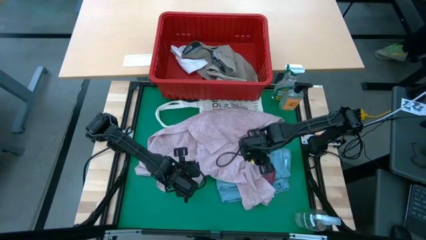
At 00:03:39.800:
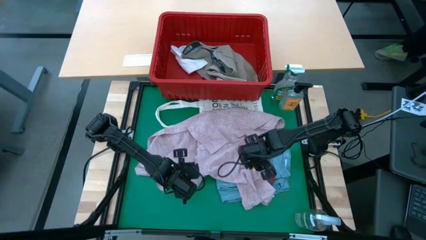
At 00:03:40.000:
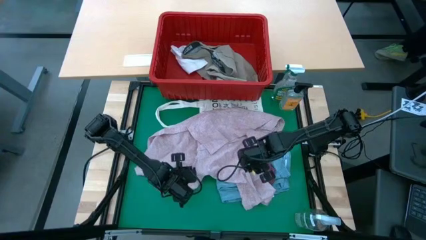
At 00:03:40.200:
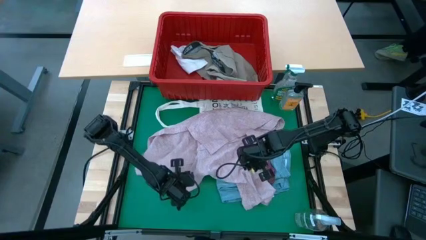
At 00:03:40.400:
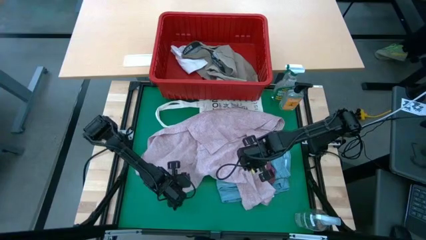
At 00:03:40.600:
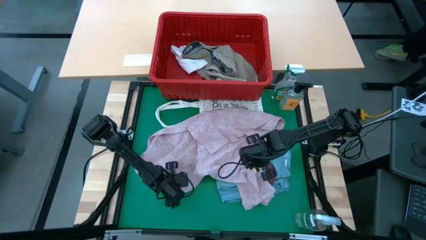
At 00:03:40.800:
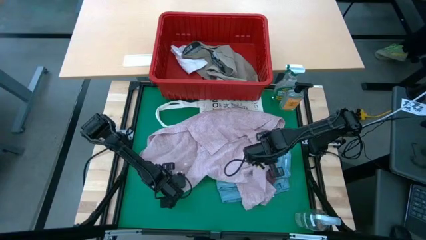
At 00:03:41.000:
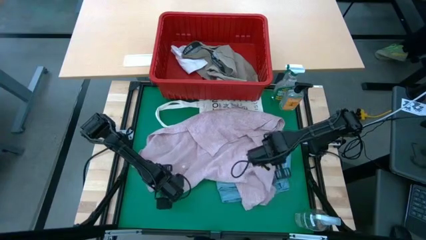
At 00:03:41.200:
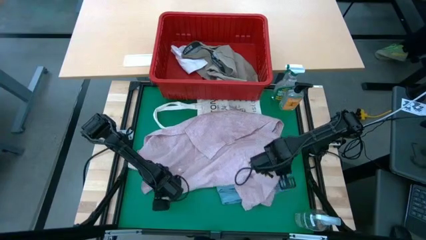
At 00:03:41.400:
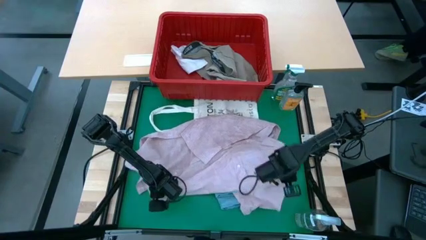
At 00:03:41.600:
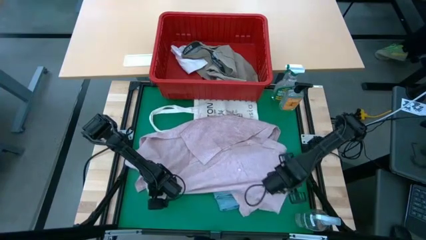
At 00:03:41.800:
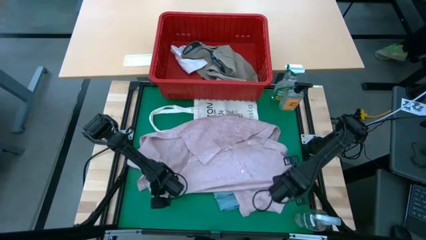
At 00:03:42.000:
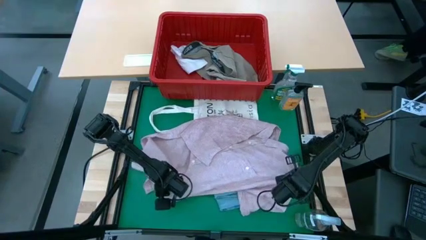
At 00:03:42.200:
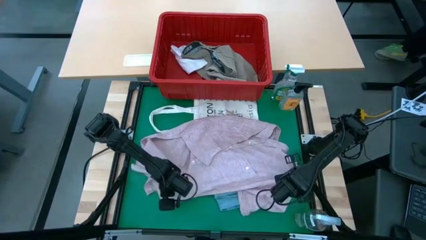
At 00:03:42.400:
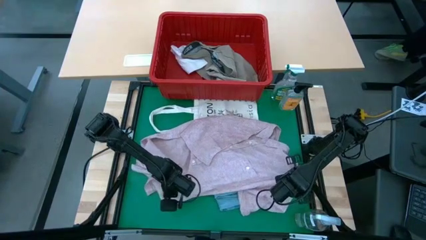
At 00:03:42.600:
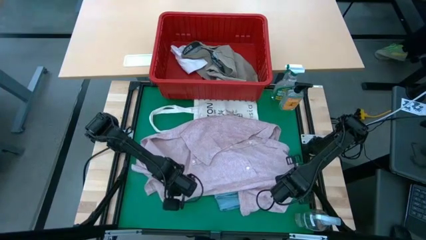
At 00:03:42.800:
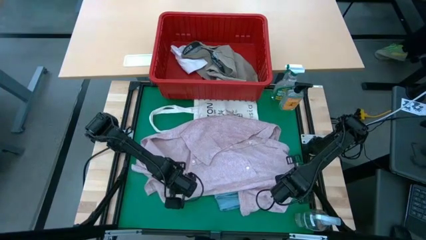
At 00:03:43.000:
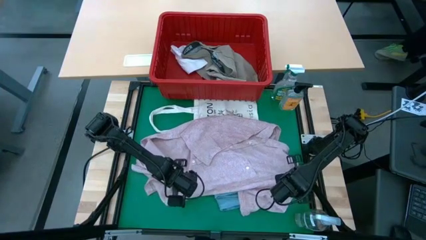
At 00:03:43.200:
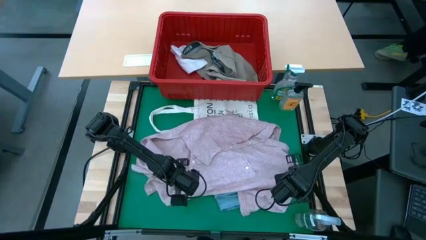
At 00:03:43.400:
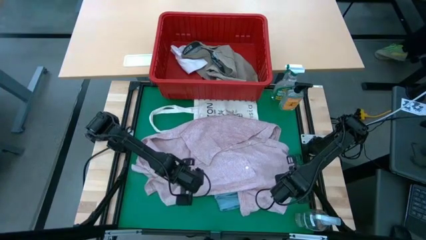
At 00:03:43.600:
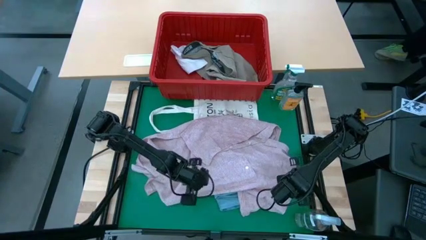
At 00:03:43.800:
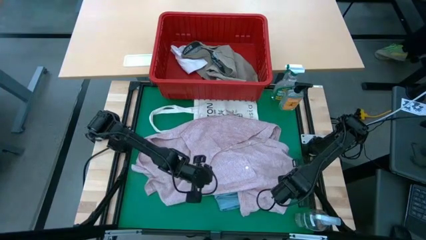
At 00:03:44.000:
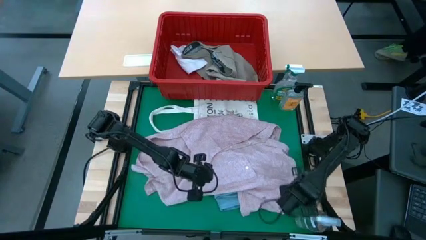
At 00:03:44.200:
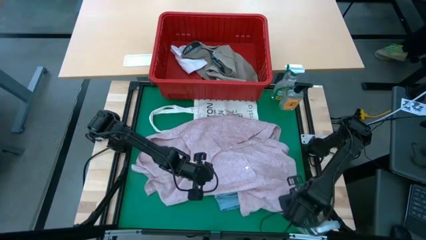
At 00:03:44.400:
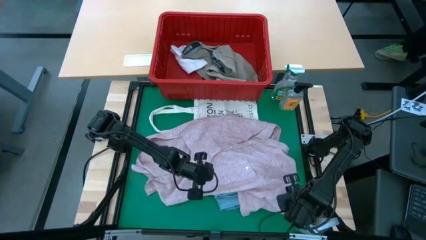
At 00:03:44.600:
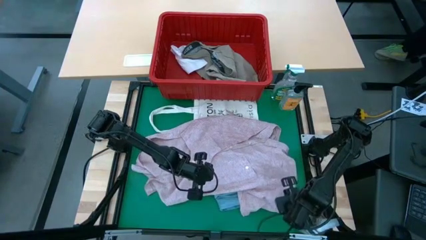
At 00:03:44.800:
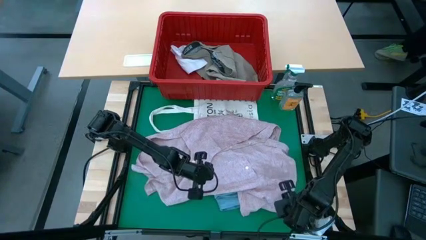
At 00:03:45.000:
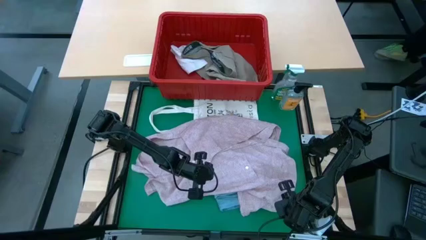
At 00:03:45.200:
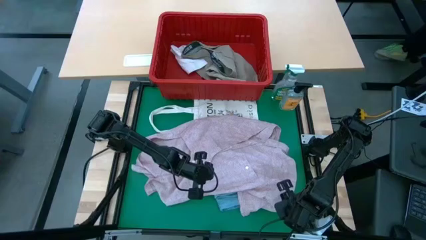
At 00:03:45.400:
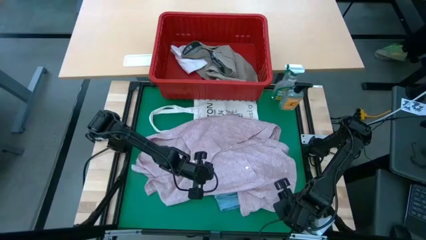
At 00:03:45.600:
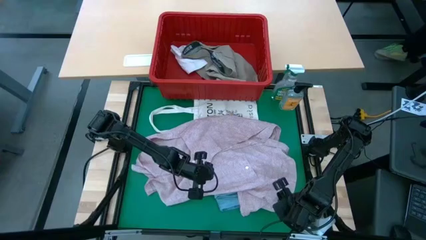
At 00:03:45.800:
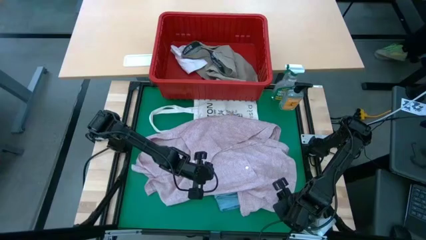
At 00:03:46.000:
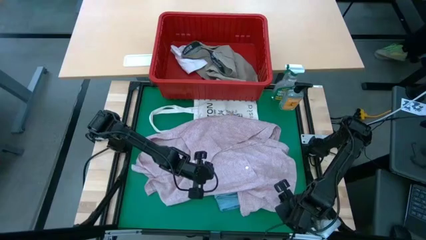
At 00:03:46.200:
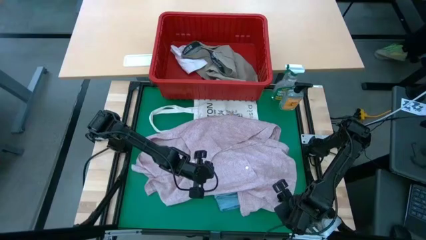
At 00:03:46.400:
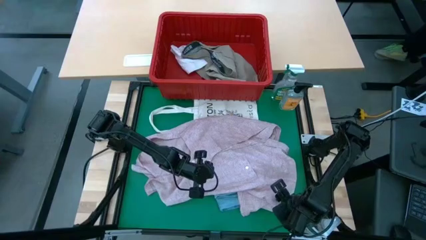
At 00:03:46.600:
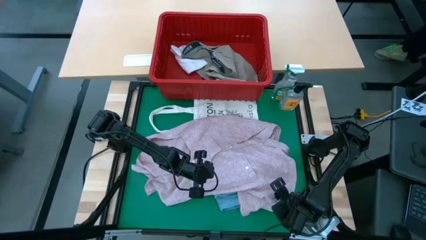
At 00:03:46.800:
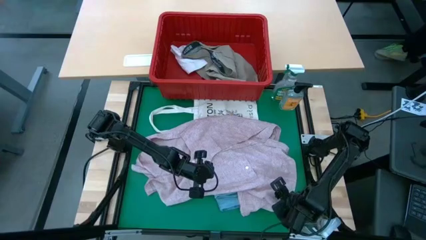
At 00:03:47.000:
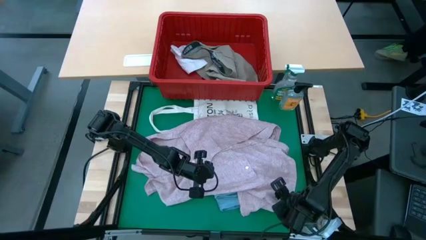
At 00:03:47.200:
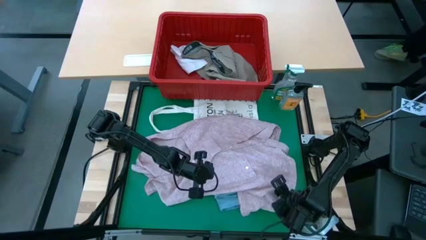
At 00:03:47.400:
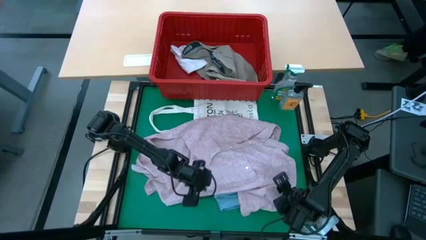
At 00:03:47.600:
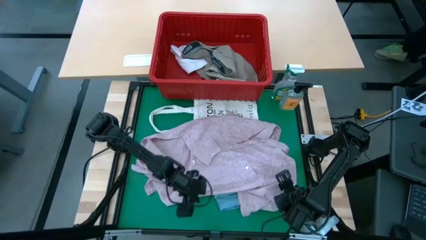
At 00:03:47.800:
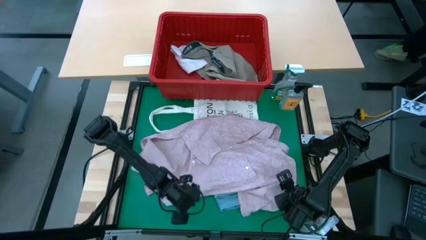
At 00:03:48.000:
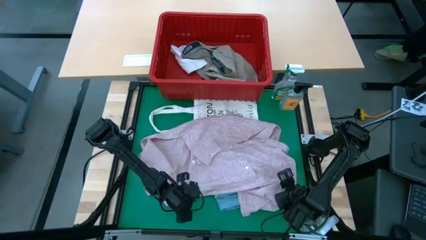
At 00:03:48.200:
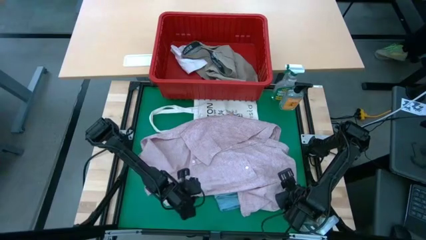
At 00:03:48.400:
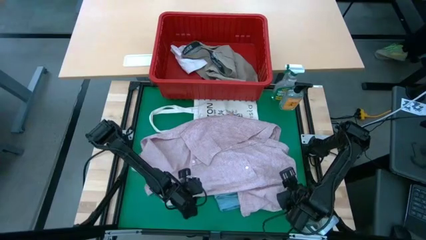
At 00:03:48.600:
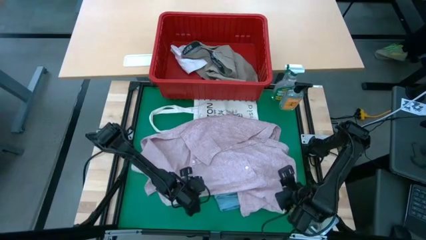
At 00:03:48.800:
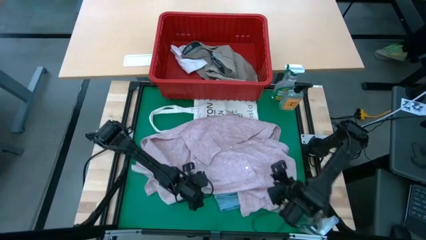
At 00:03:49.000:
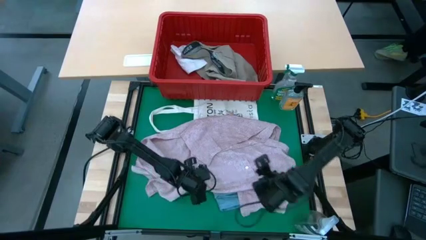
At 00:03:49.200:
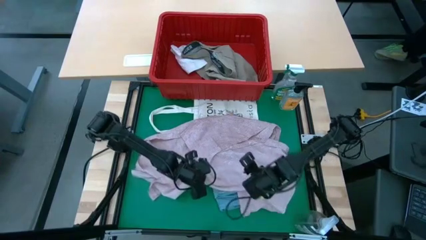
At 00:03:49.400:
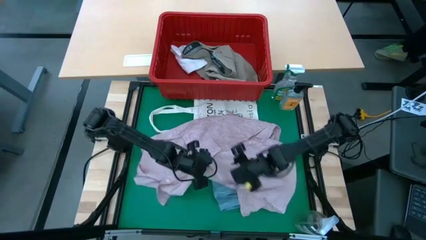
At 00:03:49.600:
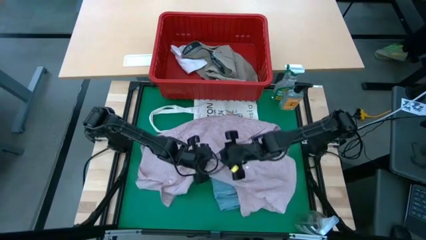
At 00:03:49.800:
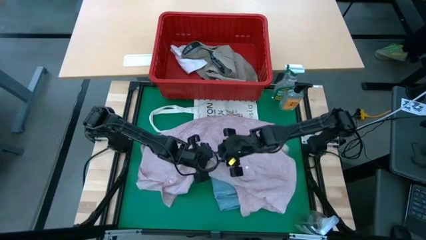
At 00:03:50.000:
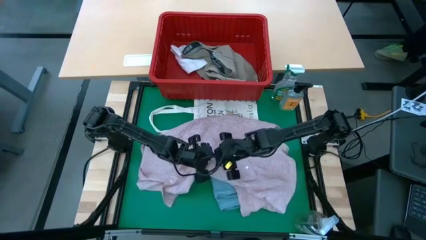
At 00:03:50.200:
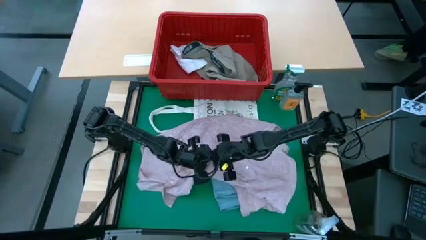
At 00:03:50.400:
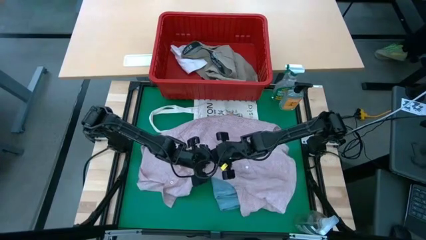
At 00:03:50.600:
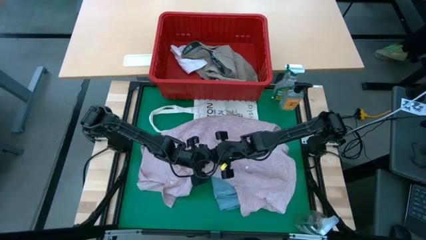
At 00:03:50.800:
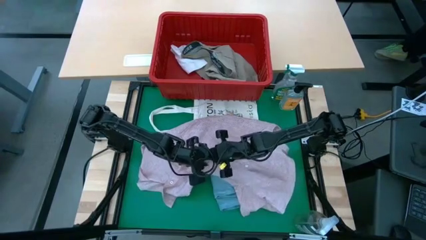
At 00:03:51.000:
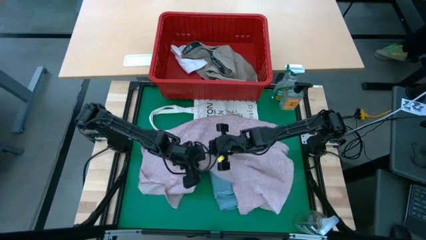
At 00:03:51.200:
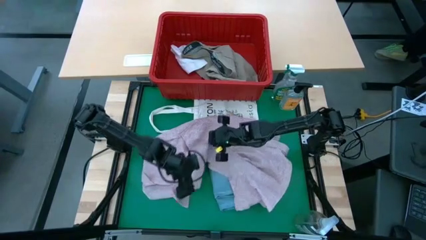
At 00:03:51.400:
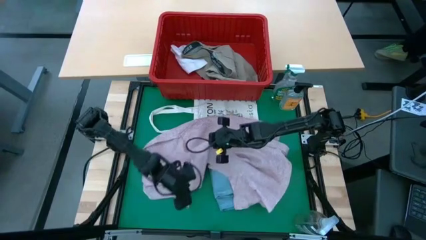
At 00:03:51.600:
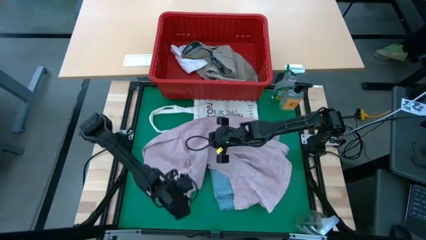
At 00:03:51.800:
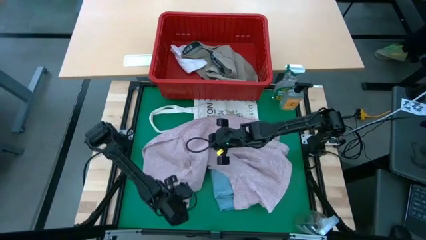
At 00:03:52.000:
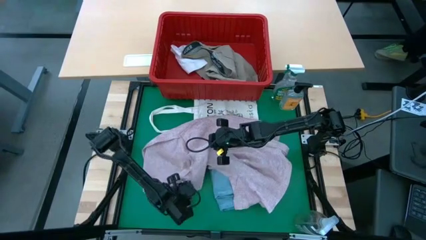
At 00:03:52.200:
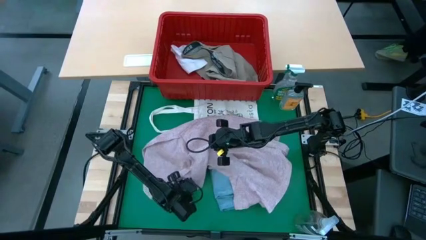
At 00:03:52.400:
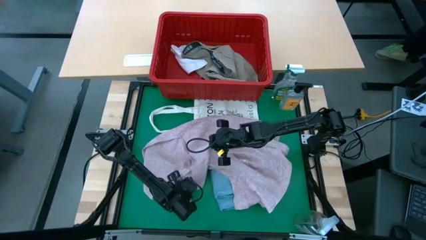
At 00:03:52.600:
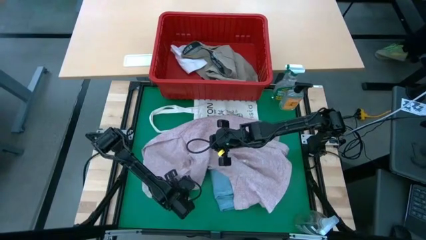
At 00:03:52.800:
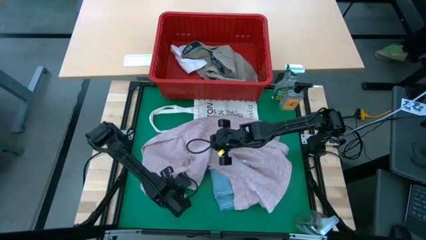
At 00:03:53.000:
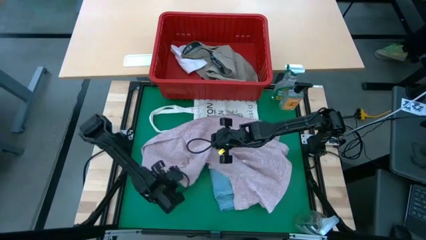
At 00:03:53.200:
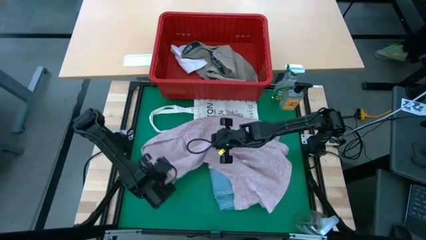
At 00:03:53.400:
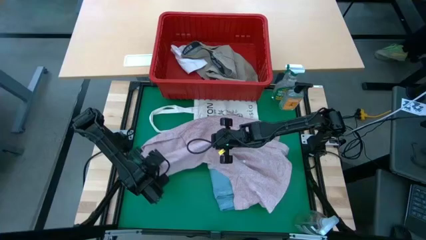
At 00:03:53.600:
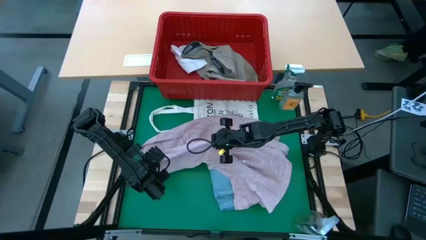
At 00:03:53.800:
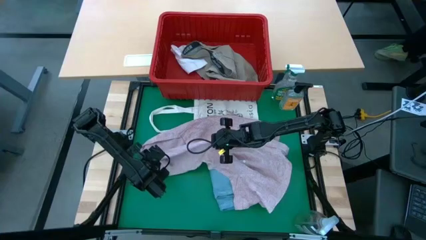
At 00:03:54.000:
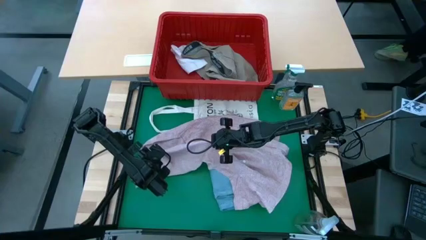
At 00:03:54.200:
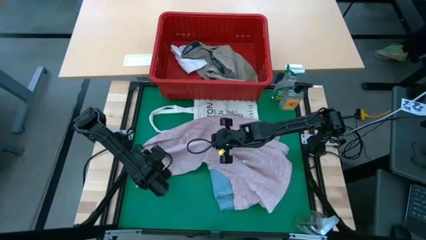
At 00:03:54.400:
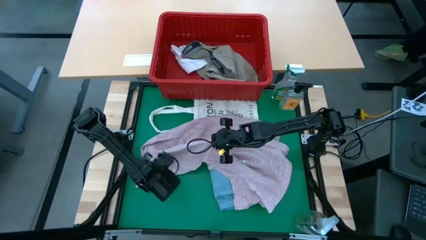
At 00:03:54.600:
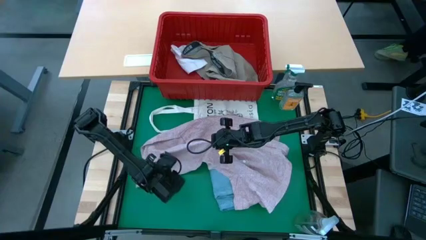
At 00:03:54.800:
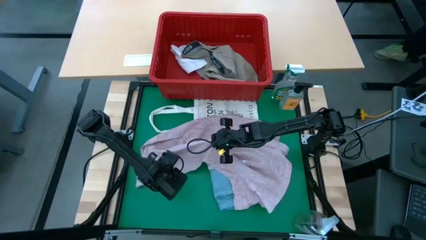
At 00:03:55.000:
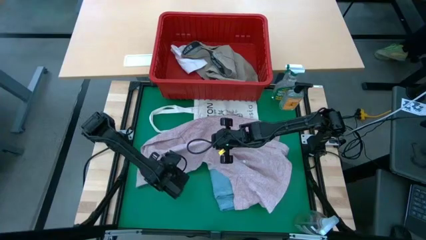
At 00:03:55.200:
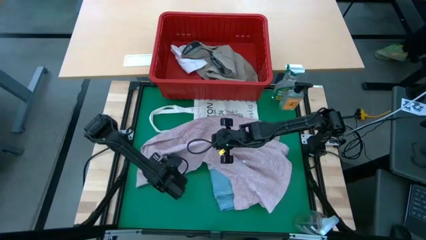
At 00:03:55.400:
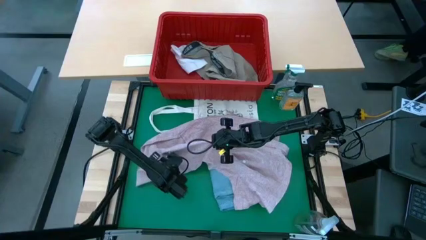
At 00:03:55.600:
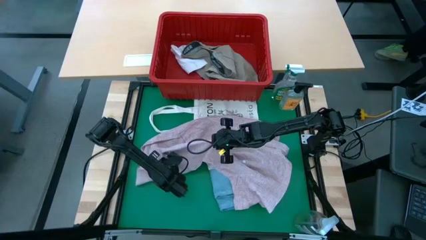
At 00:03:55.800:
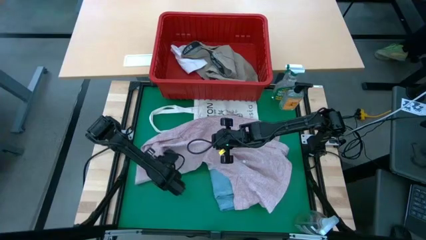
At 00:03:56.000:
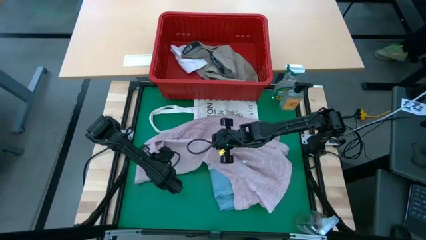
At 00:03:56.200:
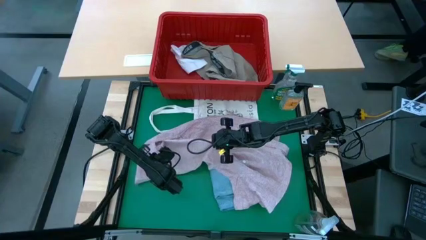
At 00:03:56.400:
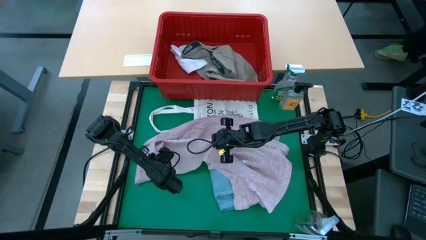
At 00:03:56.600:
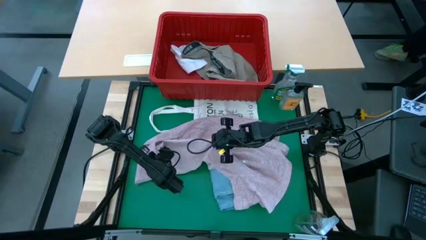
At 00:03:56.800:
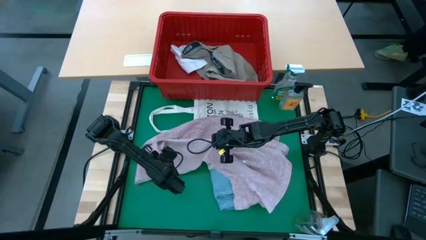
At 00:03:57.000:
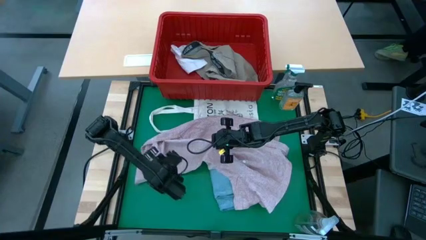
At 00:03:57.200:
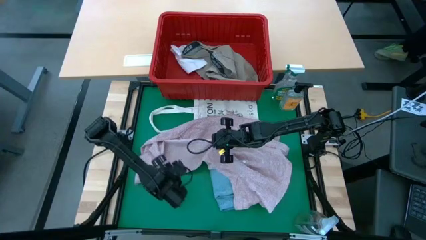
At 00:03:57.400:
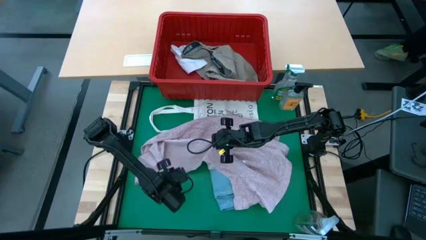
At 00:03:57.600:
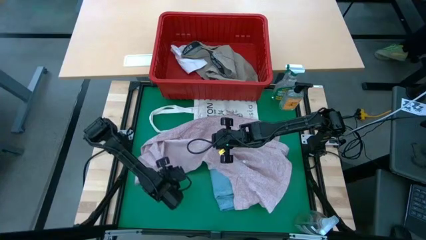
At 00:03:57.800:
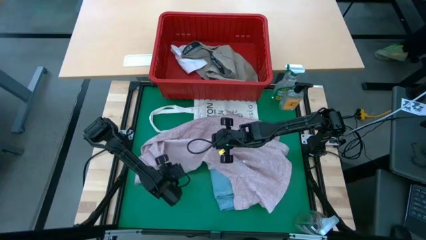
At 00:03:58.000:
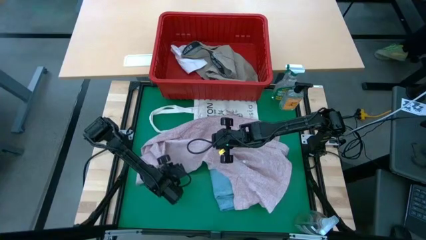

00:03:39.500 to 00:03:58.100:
Task: Fold Laundry from Bin
Fold the pink shirt from the red laundry basket
